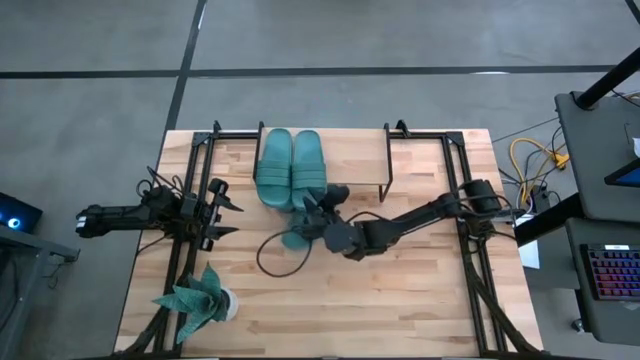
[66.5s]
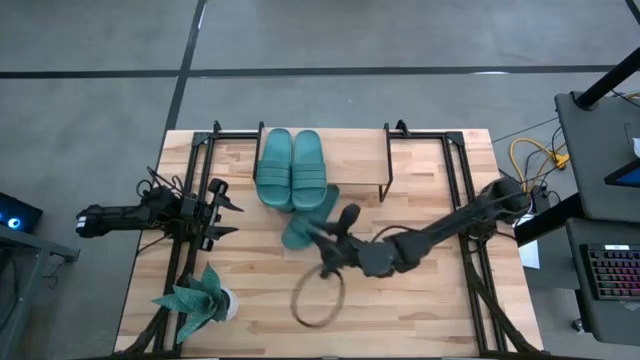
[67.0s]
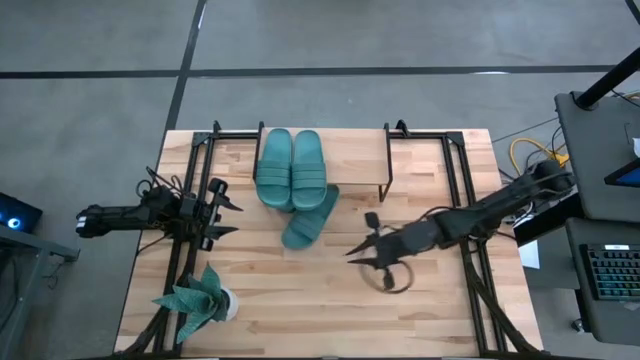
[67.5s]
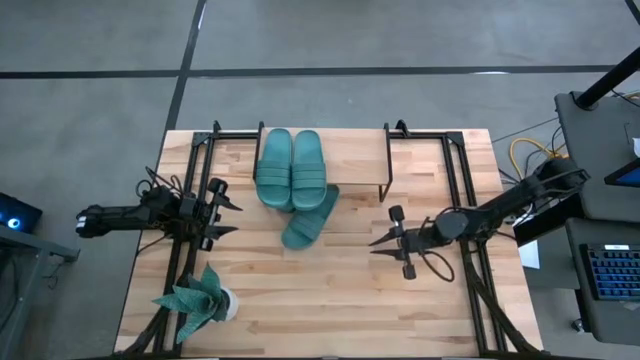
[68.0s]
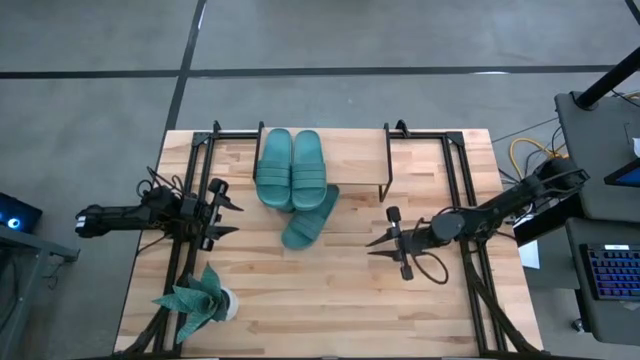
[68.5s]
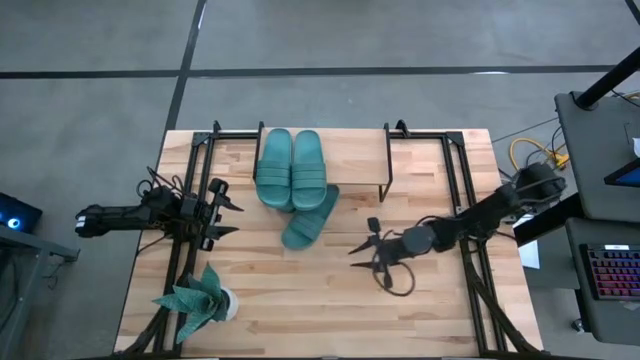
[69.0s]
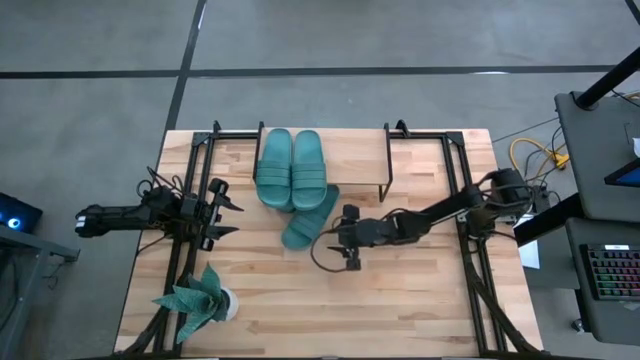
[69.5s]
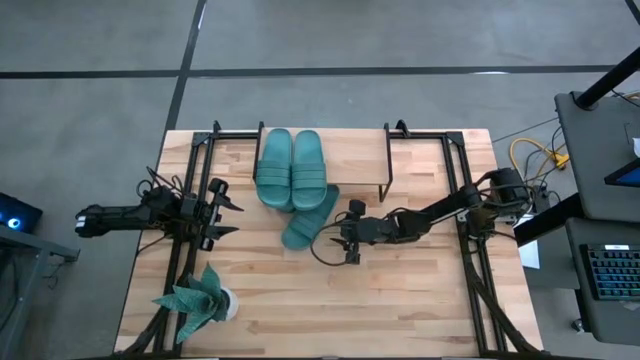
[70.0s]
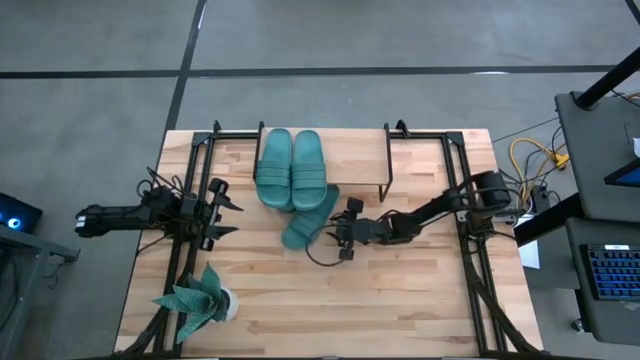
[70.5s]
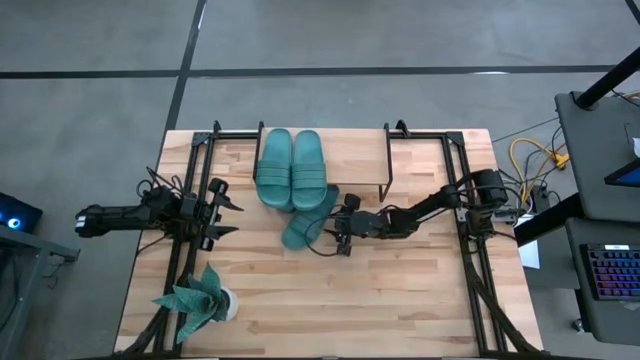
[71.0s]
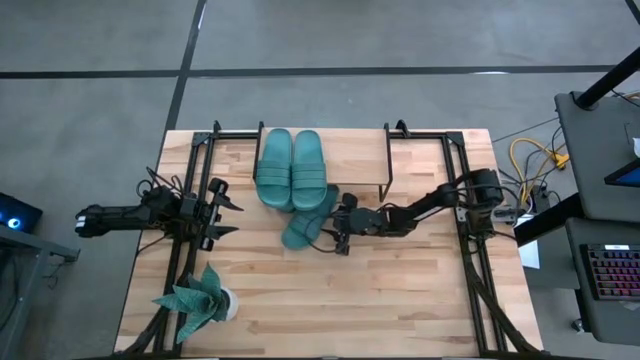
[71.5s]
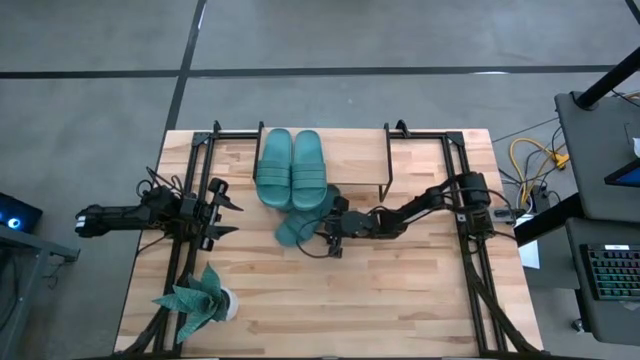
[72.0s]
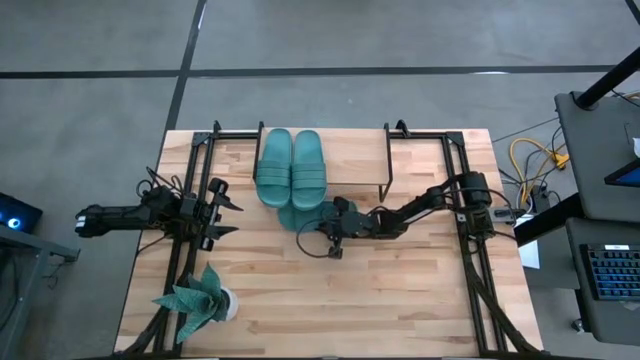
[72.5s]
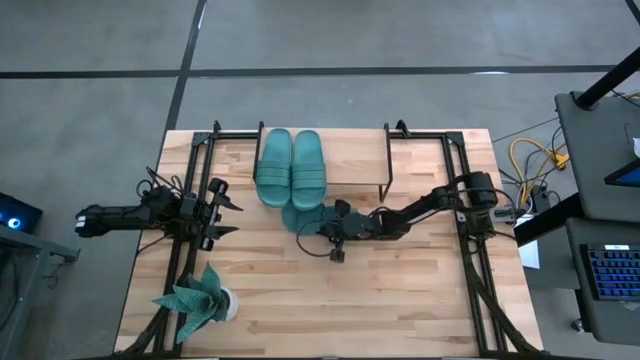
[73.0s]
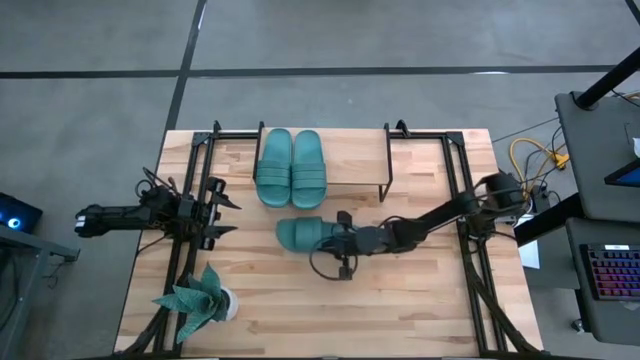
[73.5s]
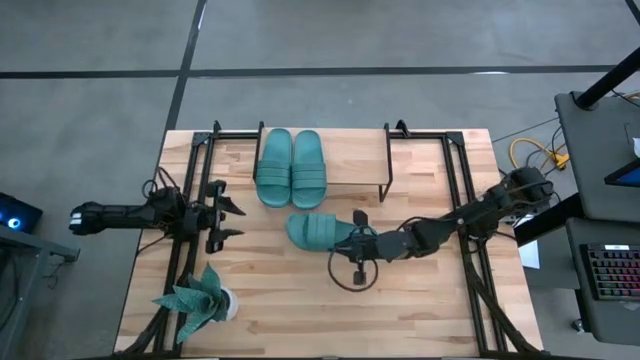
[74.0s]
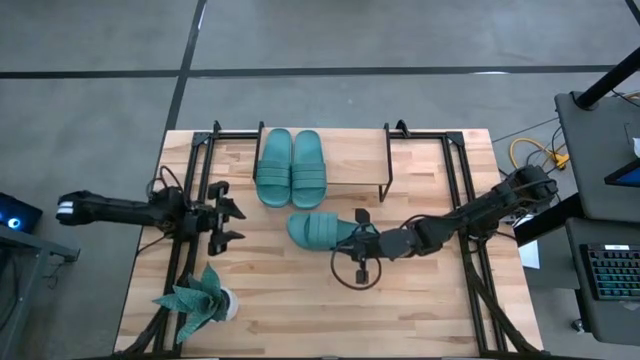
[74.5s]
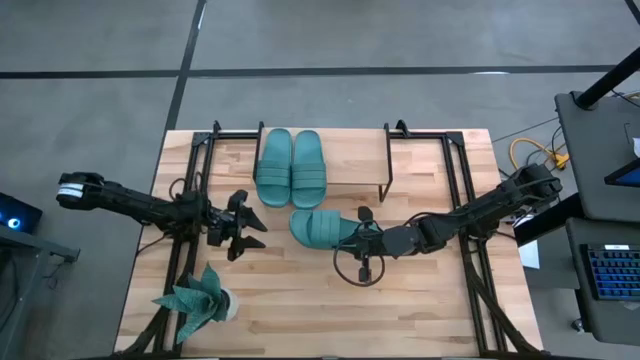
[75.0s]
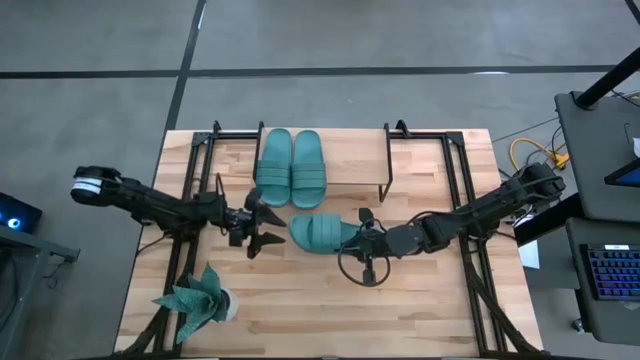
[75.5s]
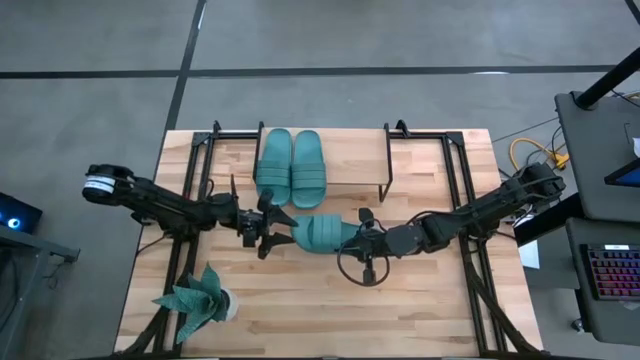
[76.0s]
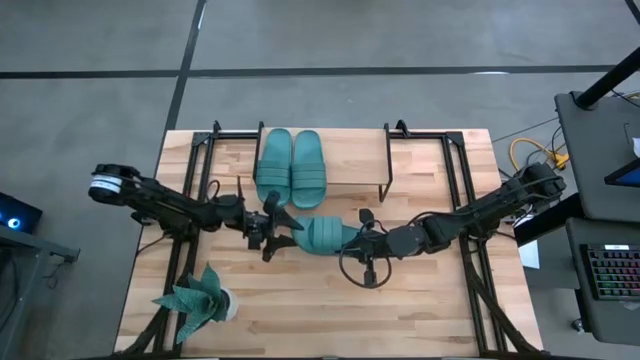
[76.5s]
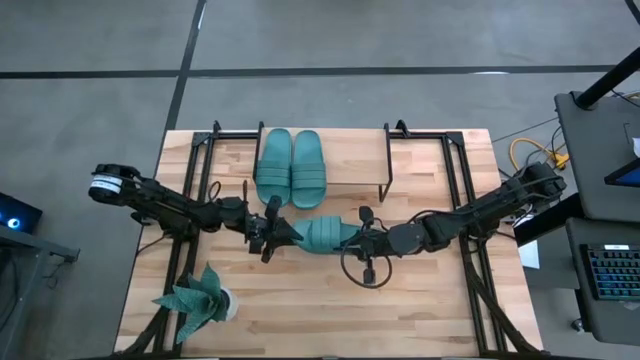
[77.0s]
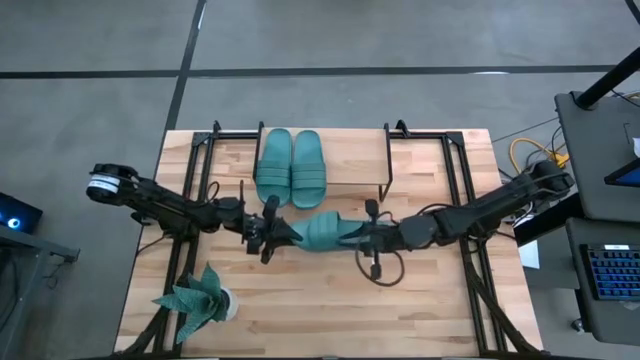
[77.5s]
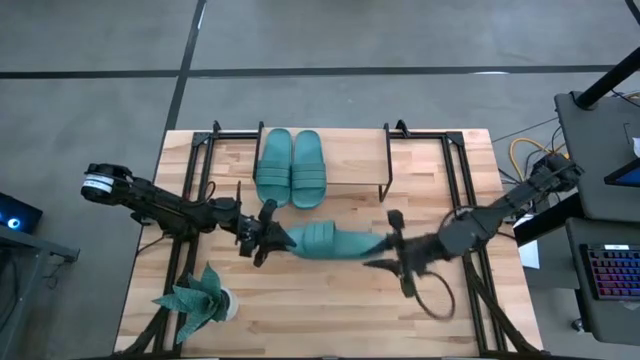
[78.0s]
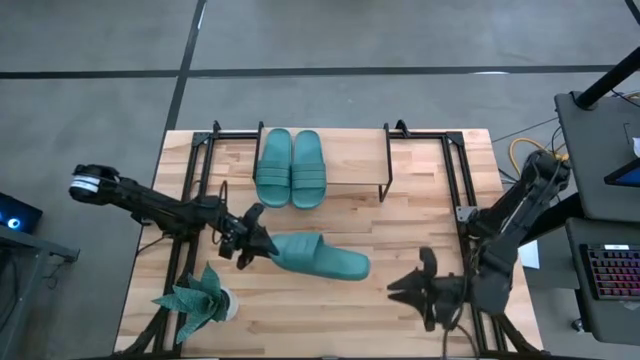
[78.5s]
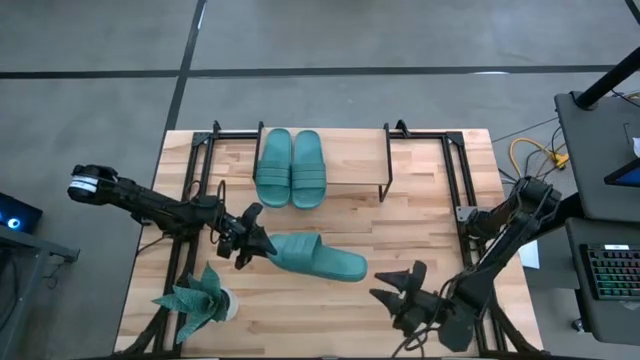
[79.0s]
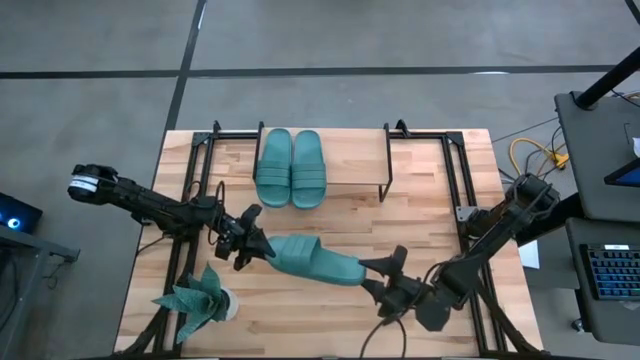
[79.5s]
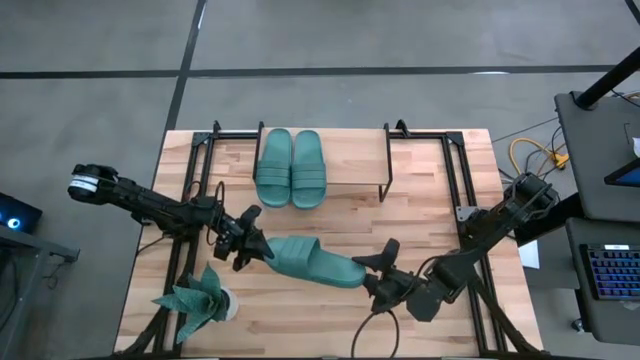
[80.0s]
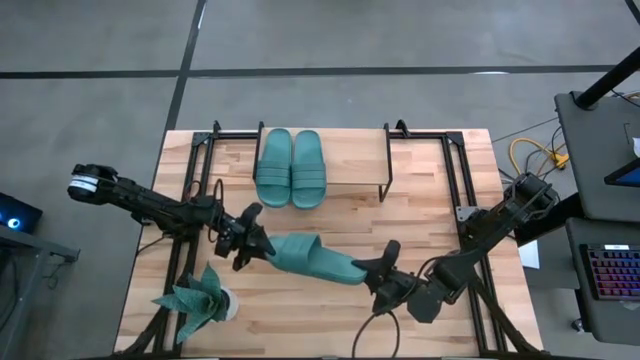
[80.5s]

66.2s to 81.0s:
Task: Pick and place slides into the shelf
Put the blue slipper on the shelf

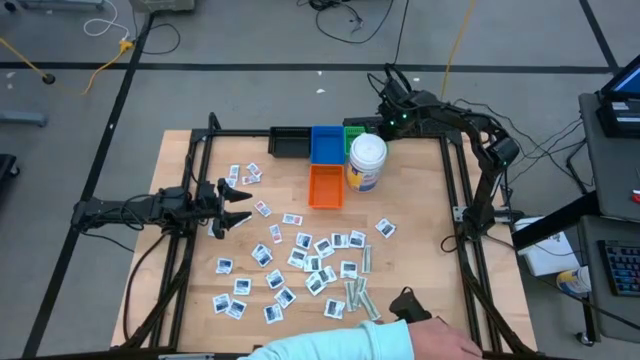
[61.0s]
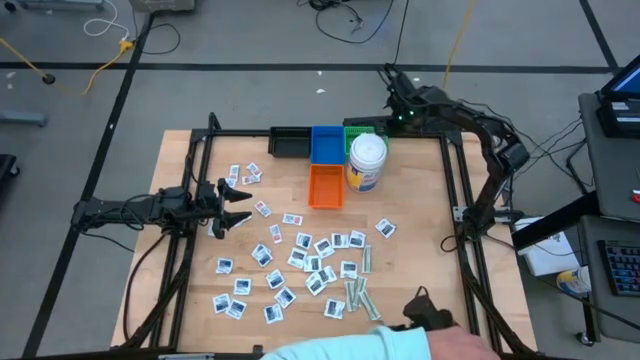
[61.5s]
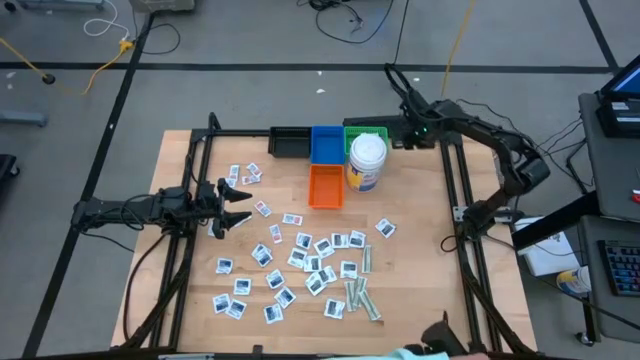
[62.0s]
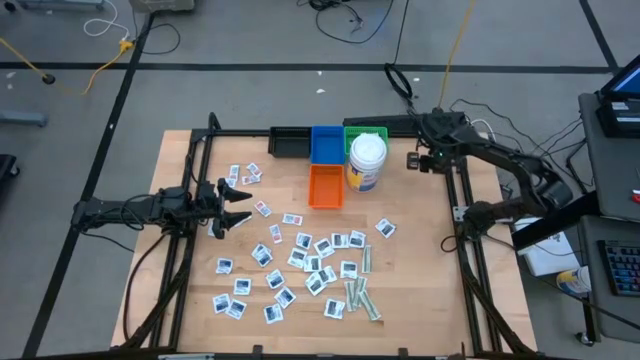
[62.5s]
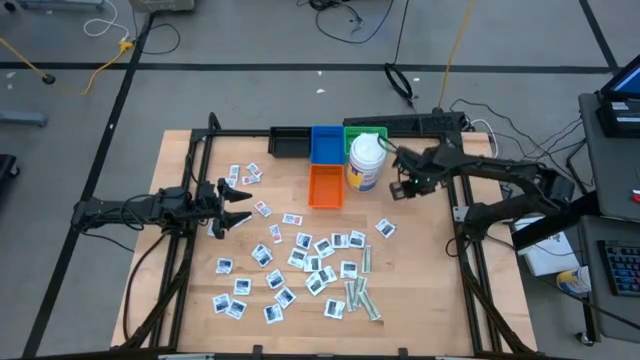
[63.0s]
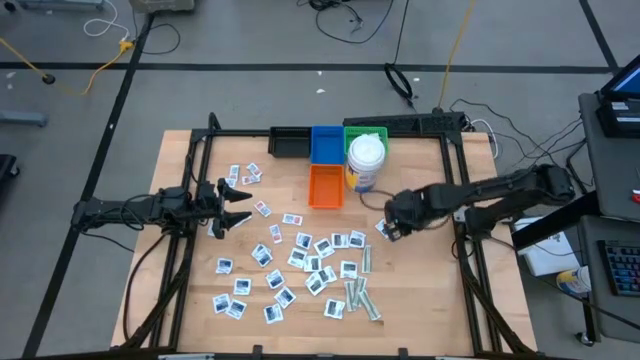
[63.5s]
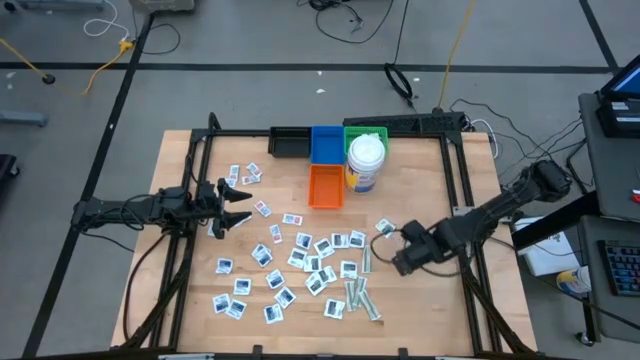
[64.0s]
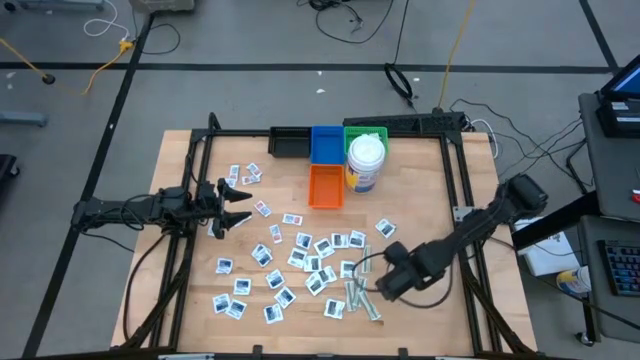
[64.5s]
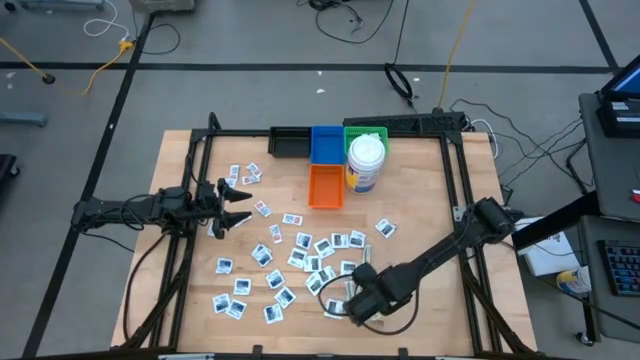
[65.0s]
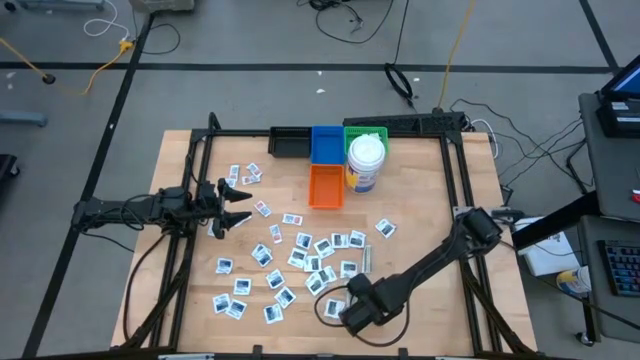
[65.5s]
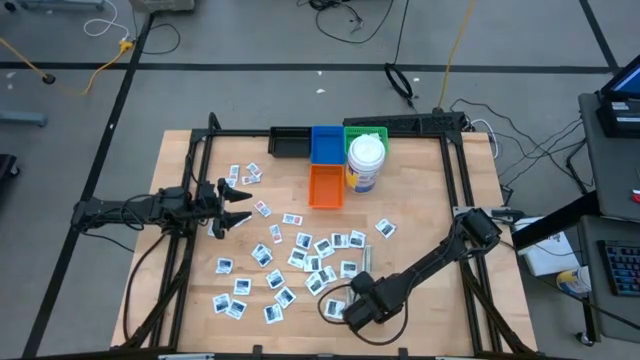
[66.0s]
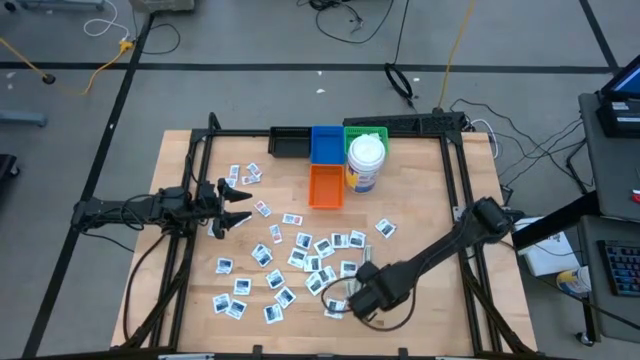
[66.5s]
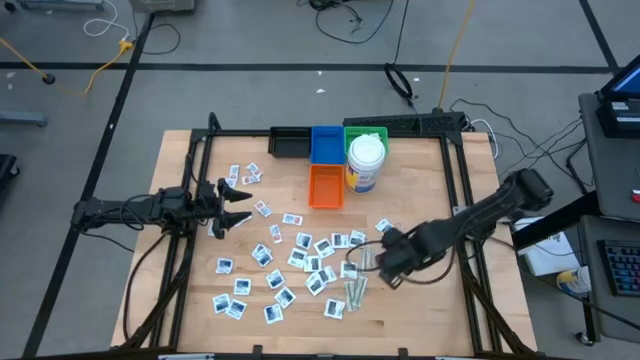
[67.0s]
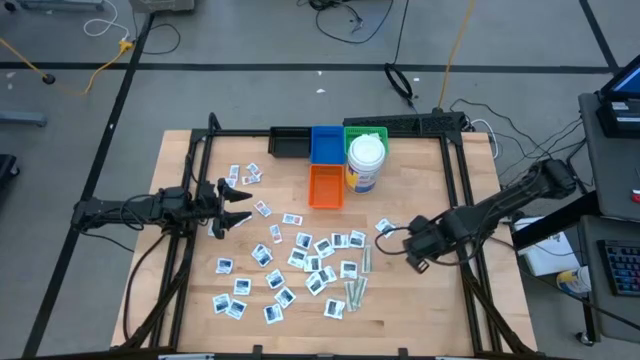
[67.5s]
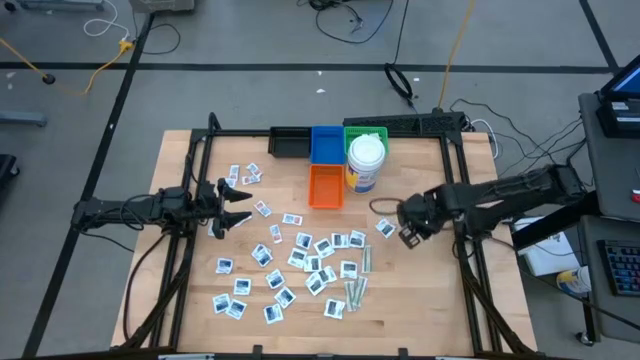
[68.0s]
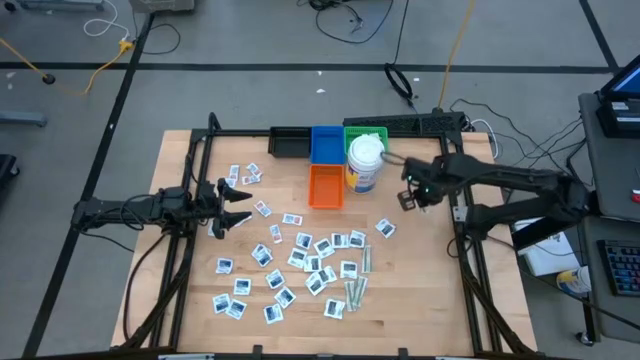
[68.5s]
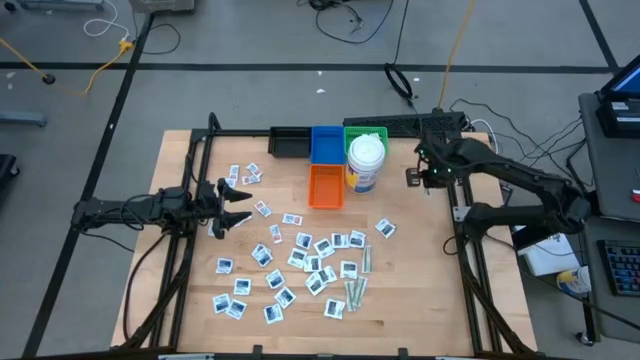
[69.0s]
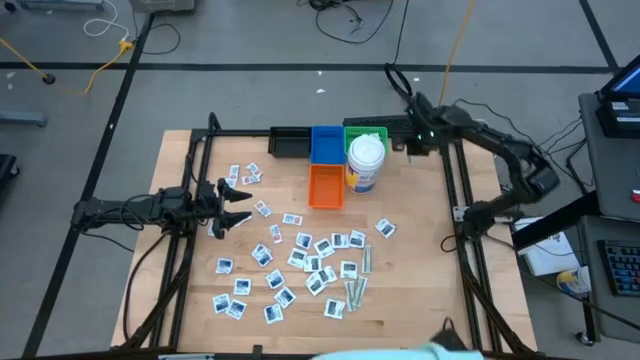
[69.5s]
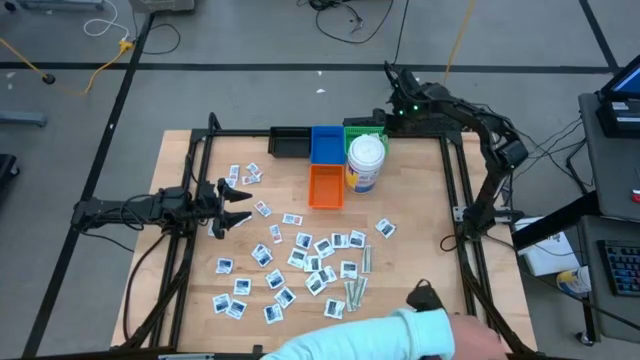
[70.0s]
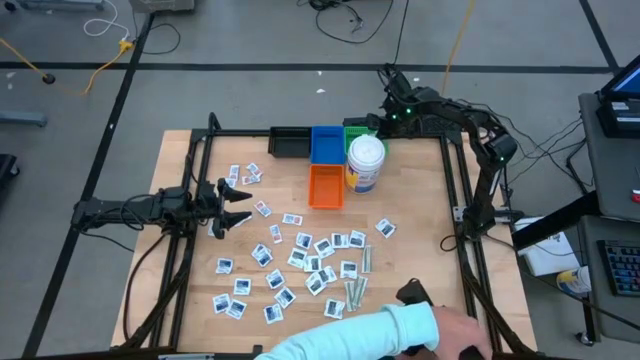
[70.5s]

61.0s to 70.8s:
Task: Pick & Place First Aid Supplies
Put the green bandage pack into the green bin
